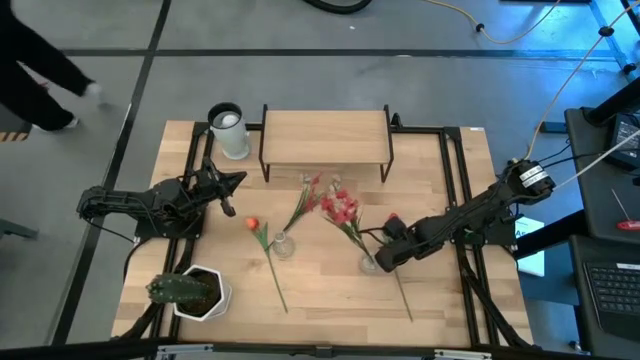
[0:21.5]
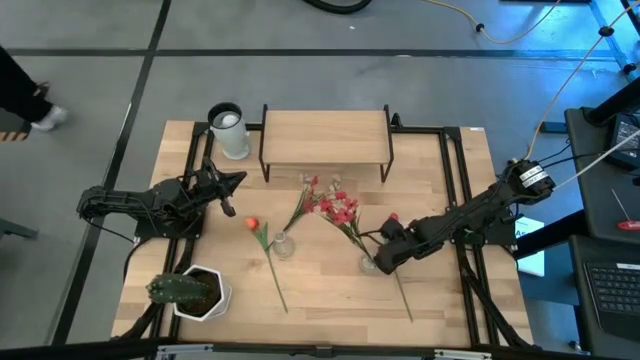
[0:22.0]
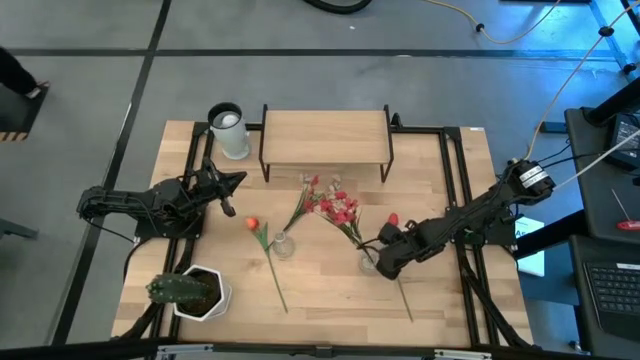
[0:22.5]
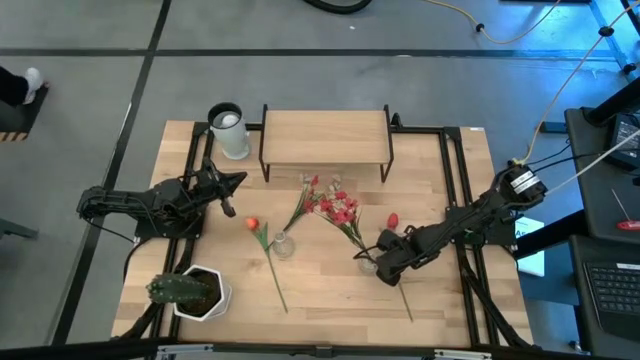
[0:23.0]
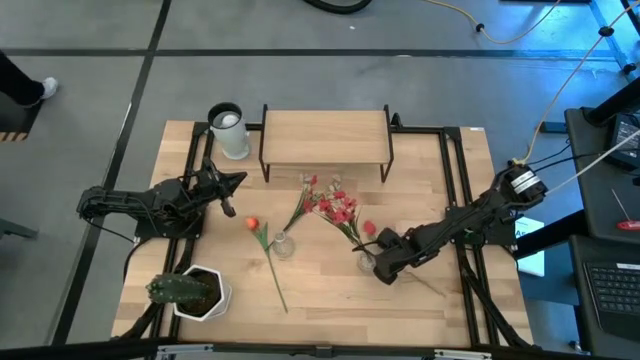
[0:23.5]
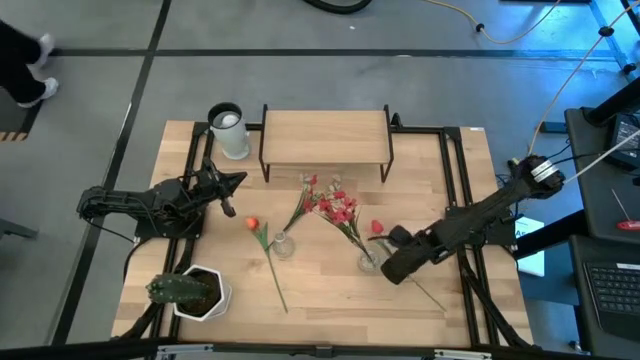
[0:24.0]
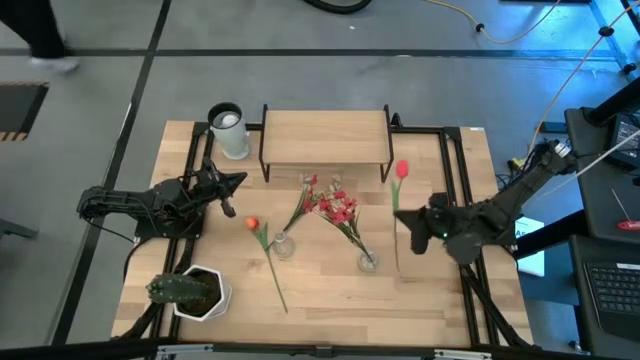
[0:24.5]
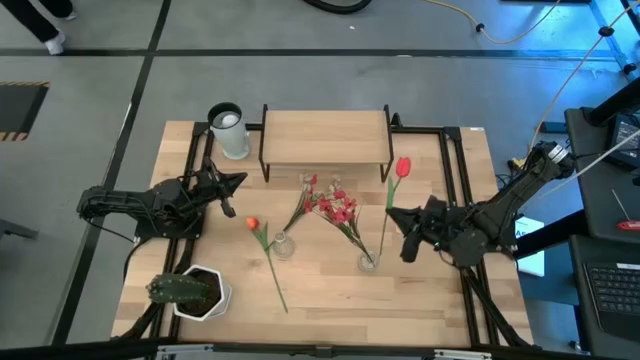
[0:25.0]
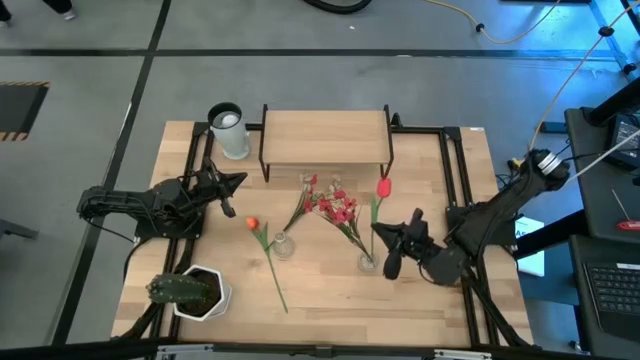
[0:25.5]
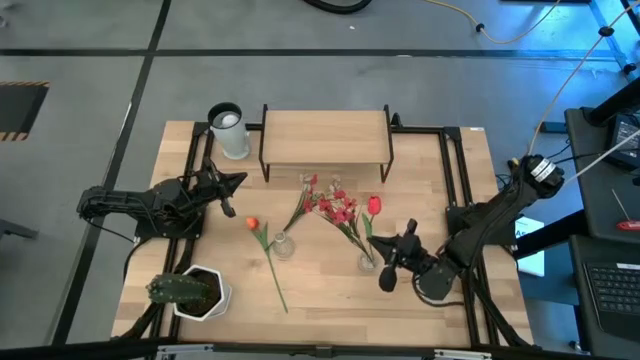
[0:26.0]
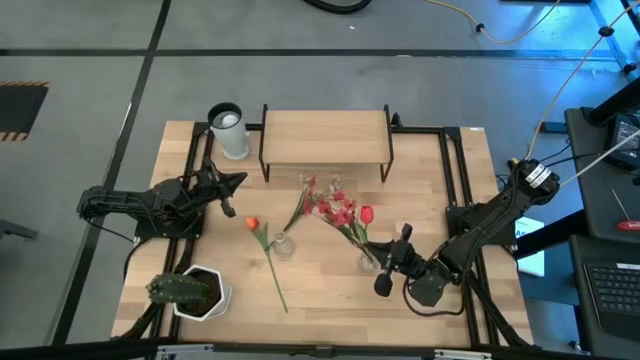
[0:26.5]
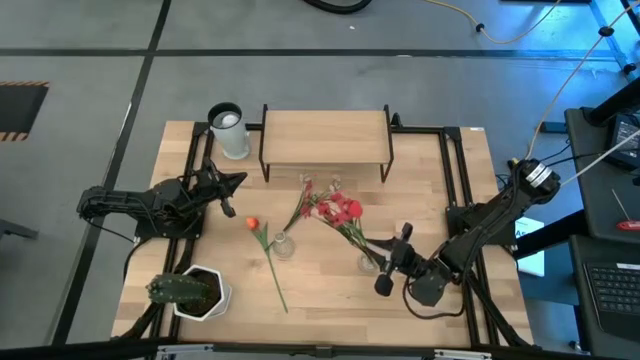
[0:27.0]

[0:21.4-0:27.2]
Task: Pick and place flowers into a vace then onto a shelf
Put the pink flower into the right transparent vase

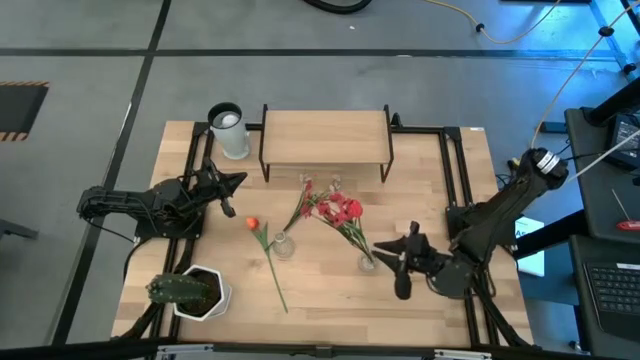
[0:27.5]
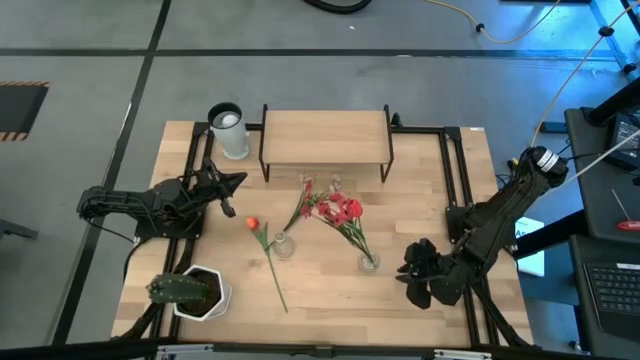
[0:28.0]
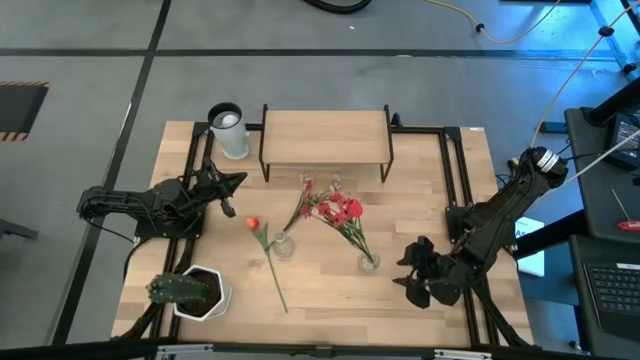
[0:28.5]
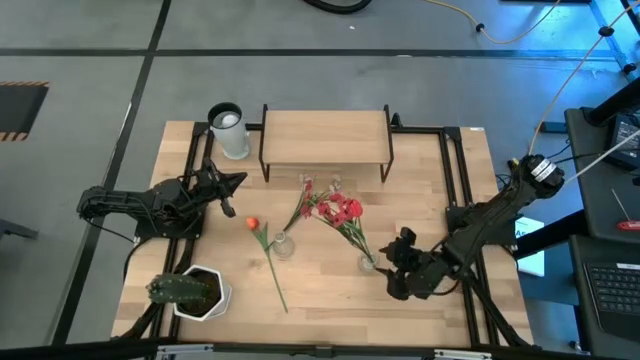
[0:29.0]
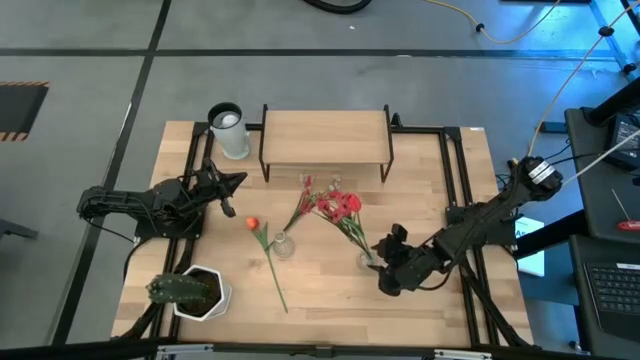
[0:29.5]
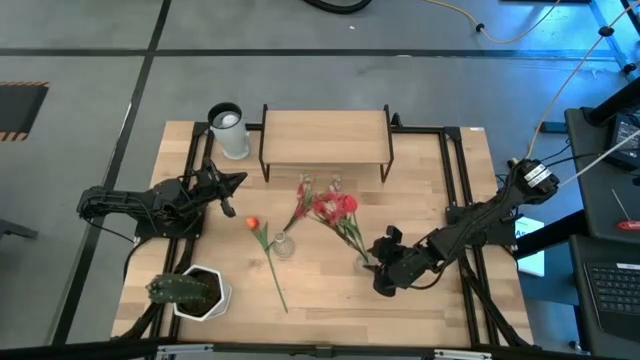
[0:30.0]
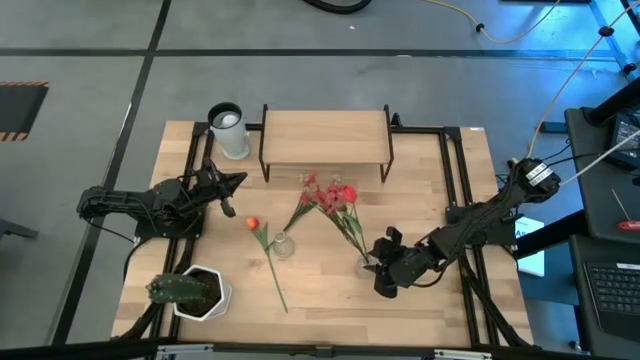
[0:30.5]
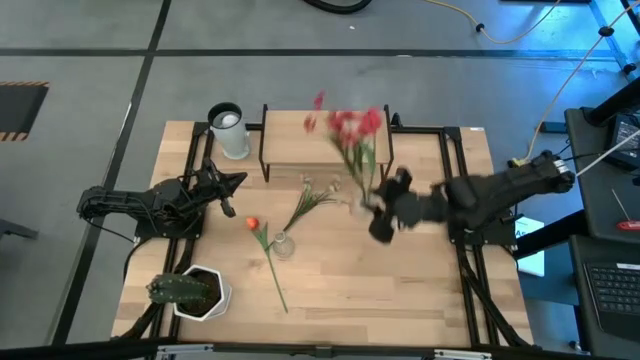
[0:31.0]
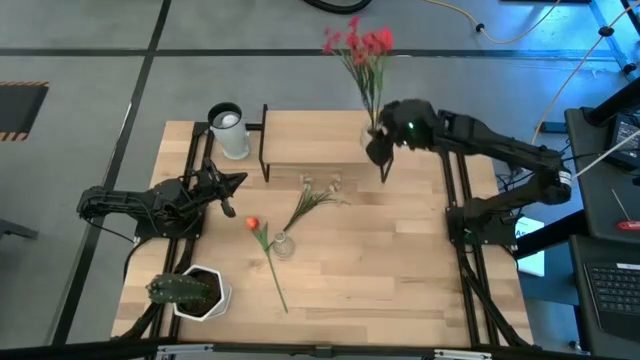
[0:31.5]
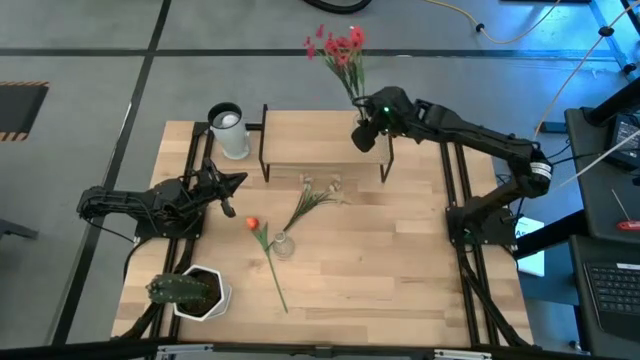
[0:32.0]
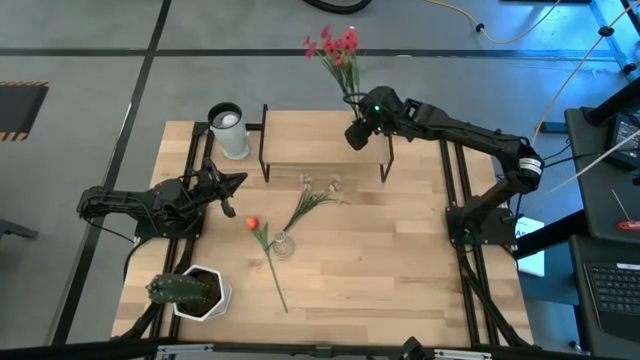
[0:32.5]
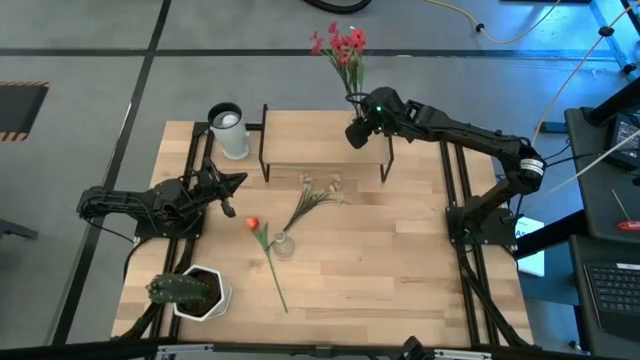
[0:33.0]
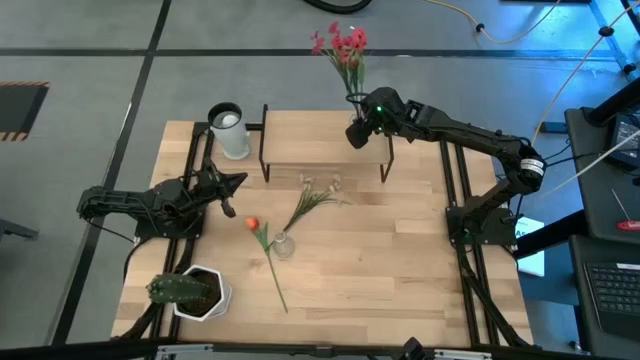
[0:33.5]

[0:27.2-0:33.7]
Put the right transparent vase on the shelf

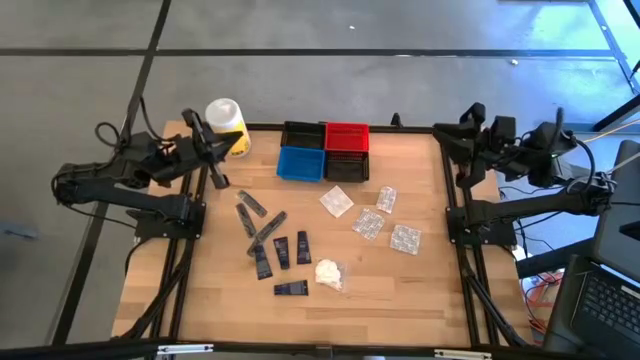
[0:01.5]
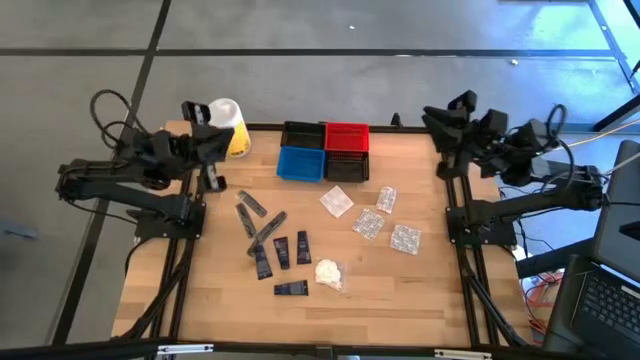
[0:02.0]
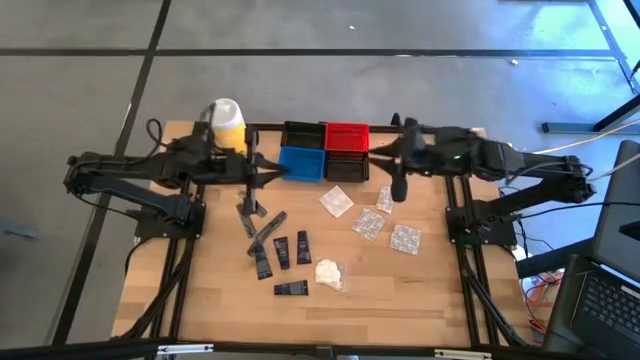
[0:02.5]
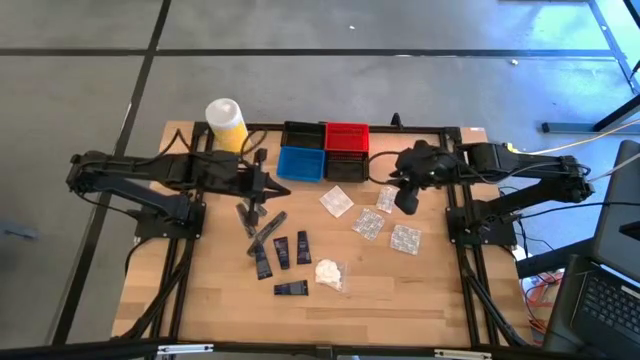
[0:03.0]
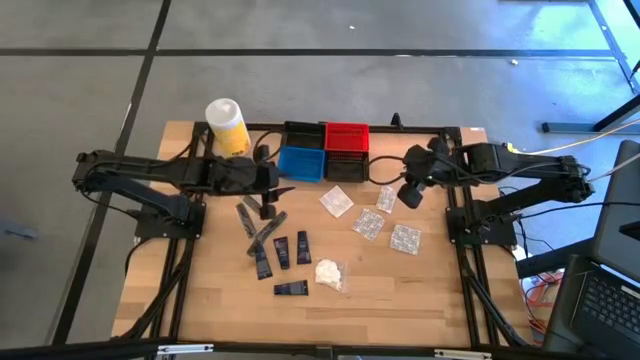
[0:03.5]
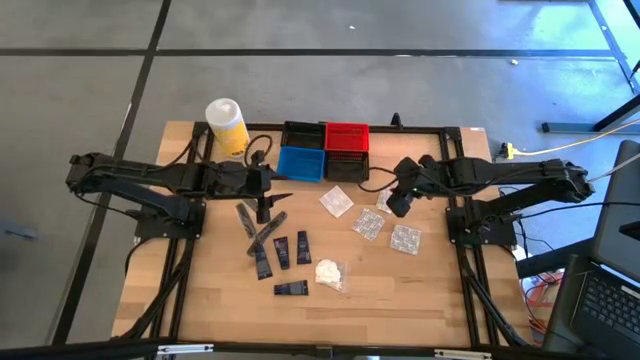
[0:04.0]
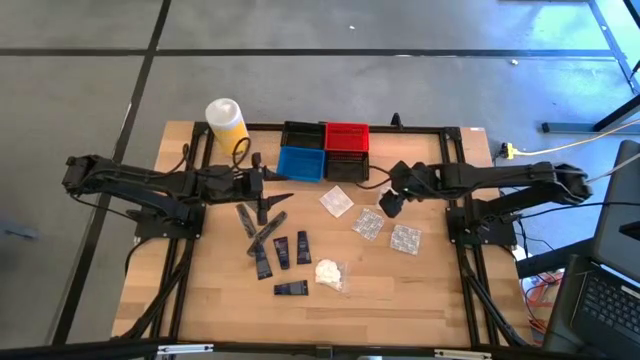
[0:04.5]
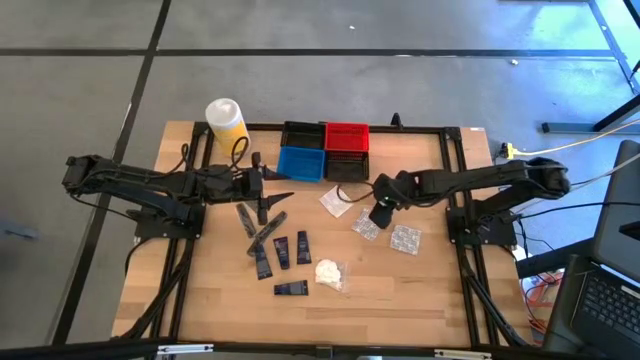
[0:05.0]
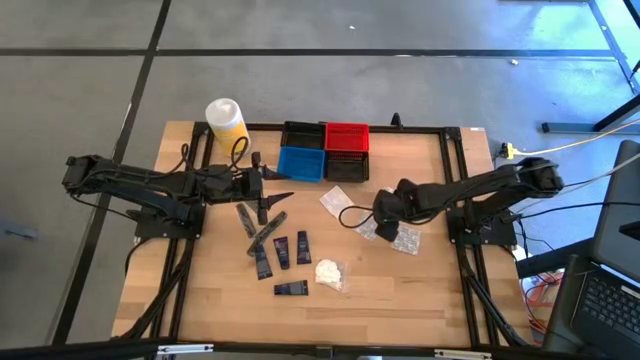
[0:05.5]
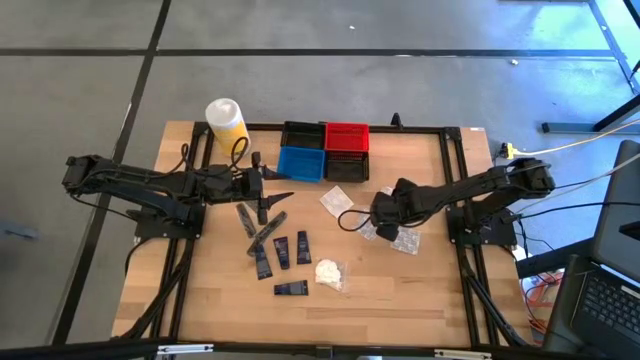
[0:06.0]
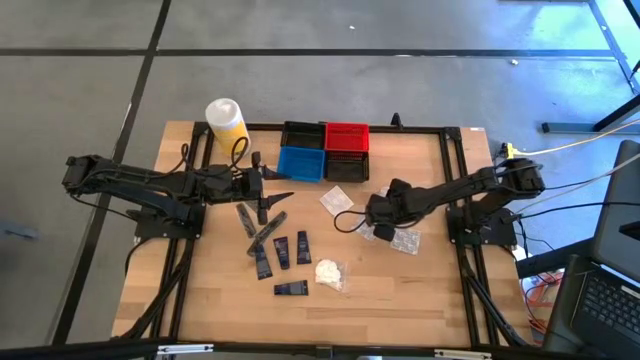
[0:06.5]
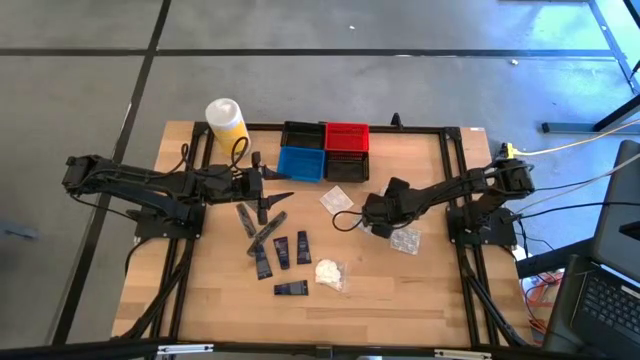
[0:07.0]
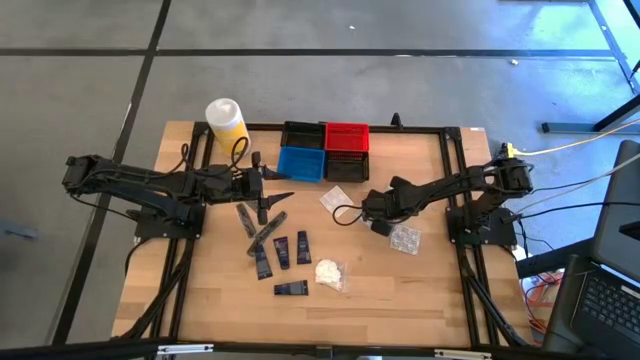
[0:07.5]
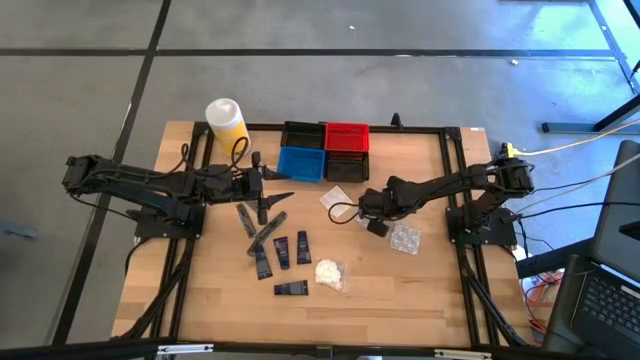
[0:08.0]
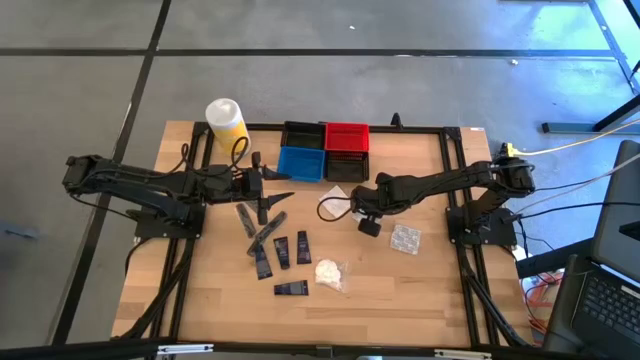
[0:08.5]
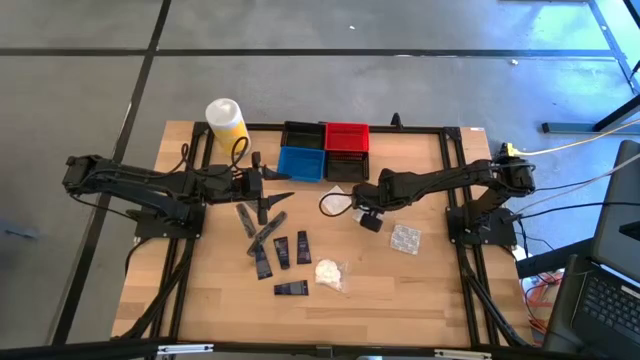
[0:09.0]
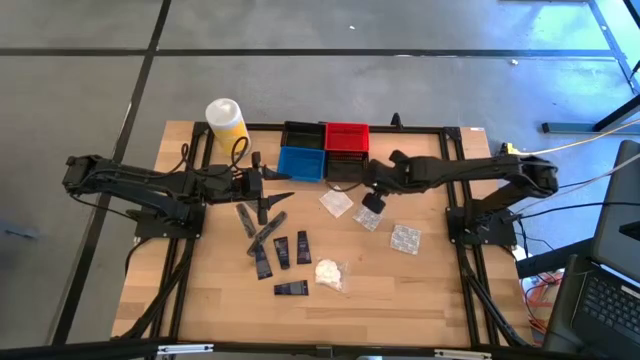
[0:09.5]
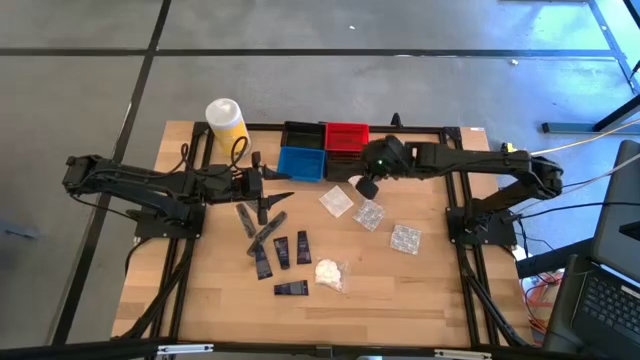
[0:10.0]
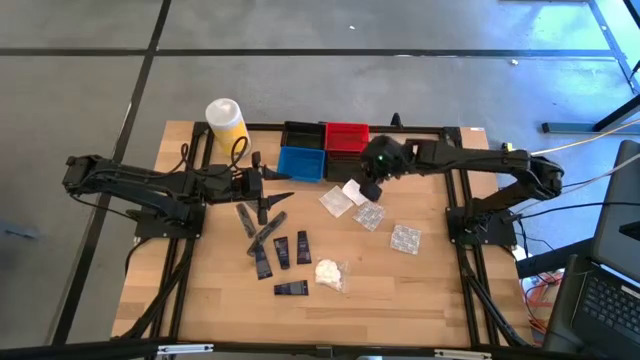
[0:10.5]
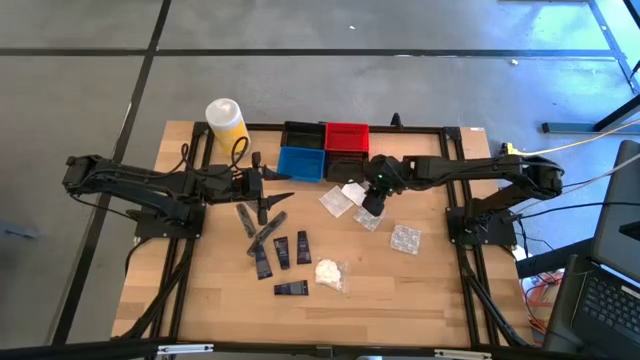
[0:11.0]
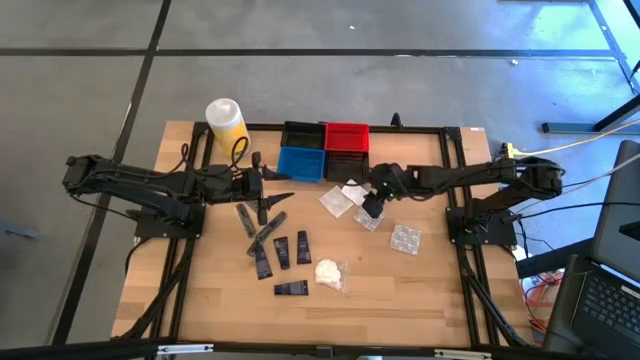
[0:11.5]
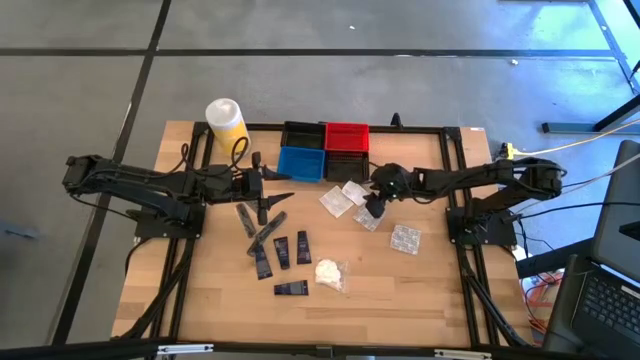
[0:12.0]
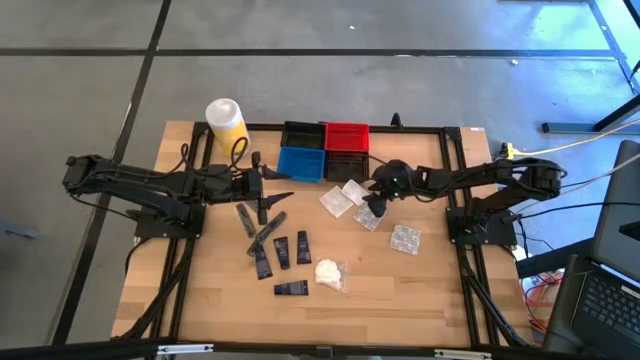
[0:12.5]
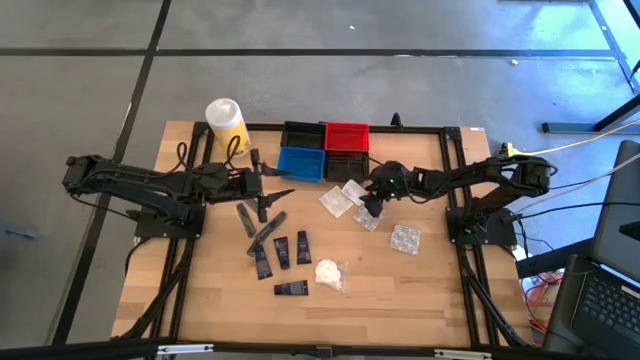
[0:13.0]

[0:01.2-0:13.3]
Task: Pick & Place Travel size toiletries
Put the bandage pack into the bottom black bin
